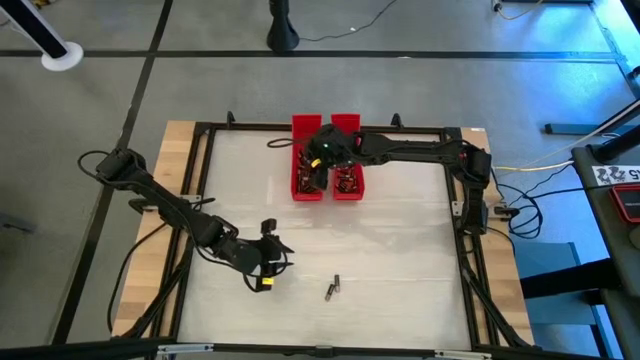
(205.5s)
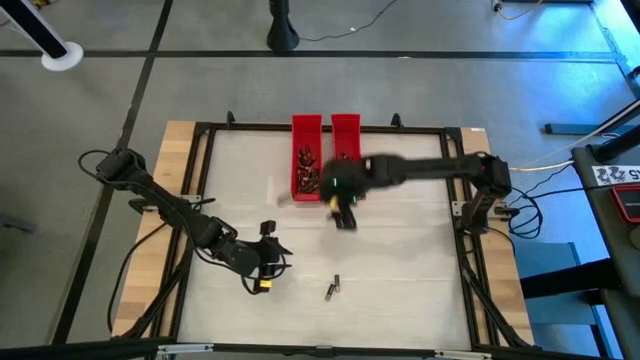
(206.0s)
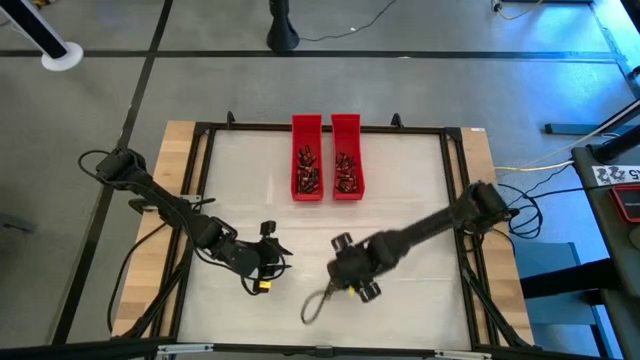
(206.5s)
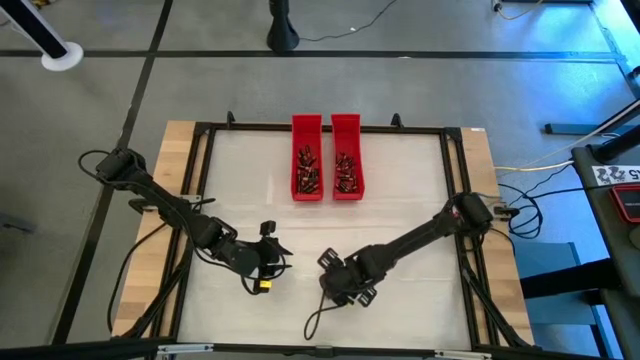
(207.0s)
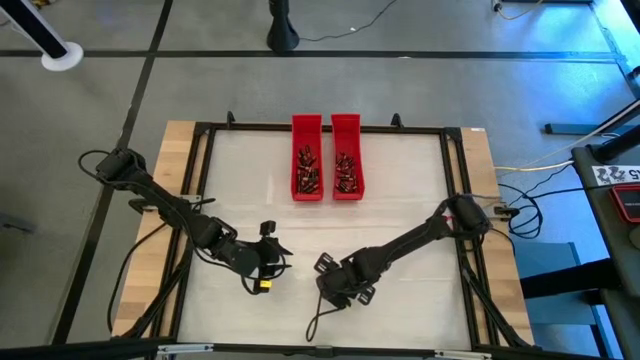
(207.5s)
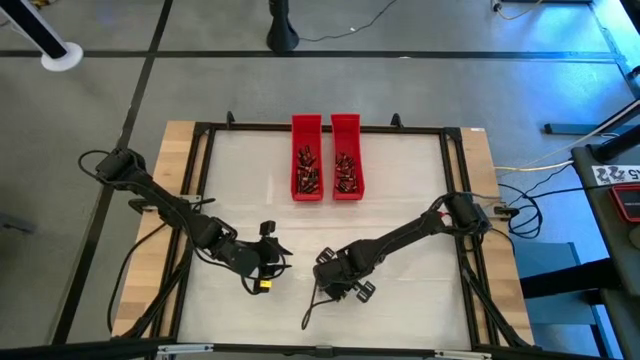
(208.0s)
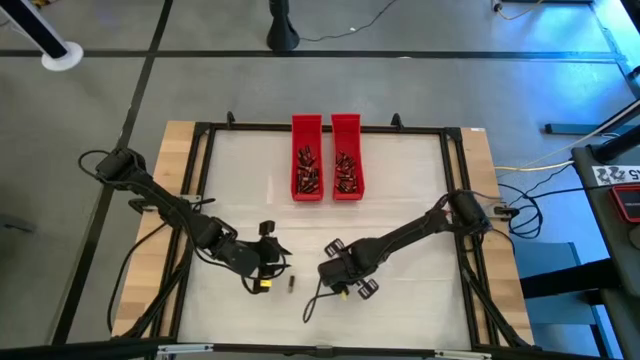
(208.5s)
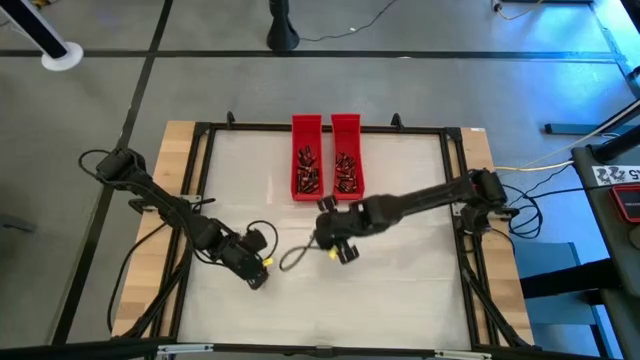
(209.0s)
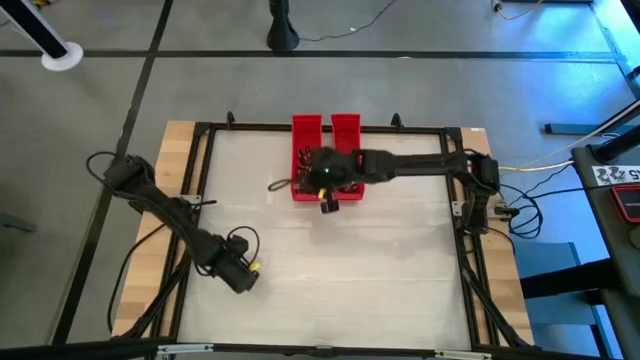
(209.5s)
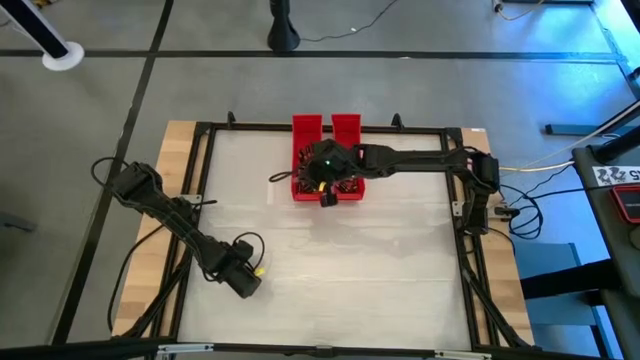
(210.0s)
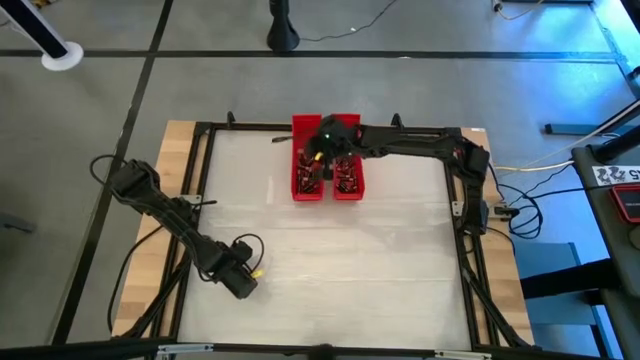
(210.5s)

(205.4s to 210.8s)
Task: Sort batteries
Put the large black battery into the left red bin

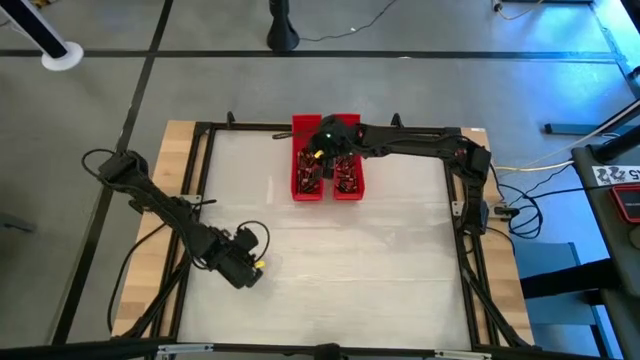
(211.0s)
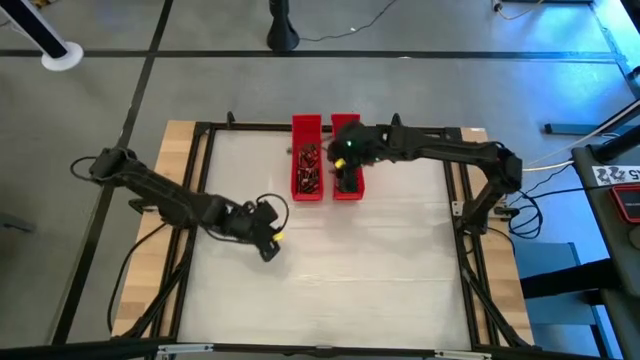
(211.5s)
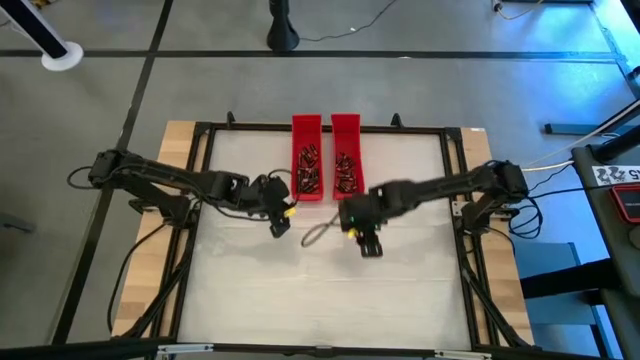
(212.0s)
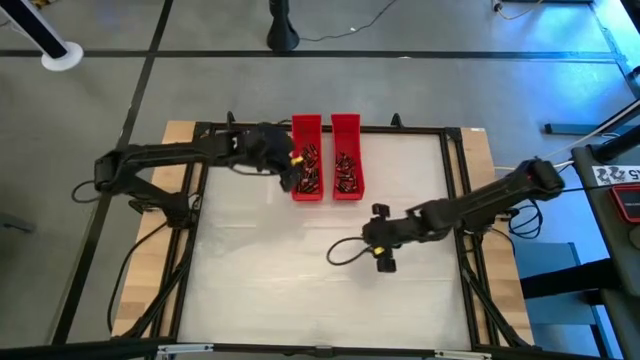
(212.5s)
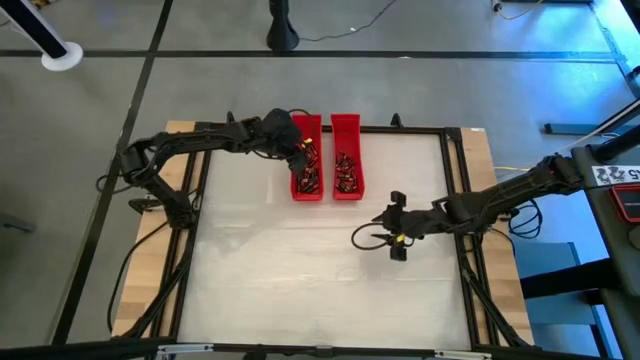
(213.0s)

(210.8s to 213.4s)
Put the large black battery into the left red bin

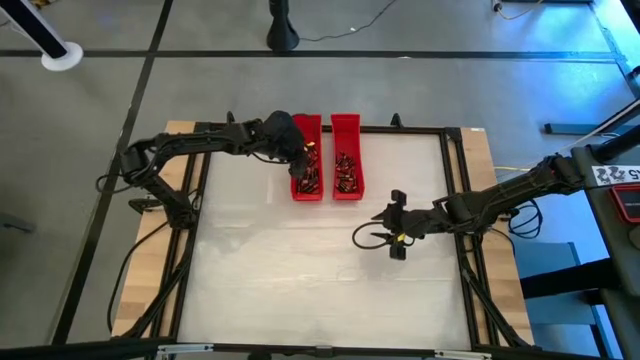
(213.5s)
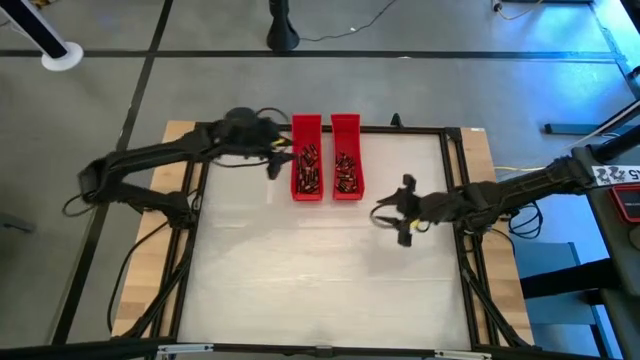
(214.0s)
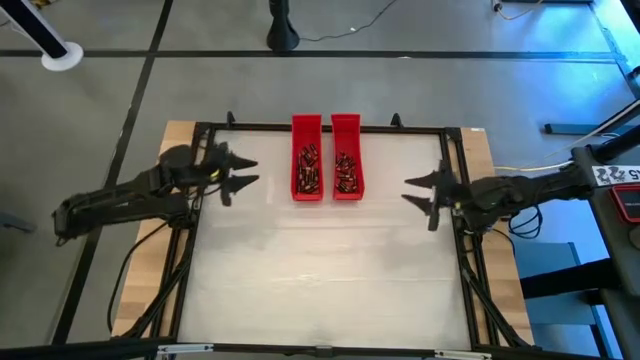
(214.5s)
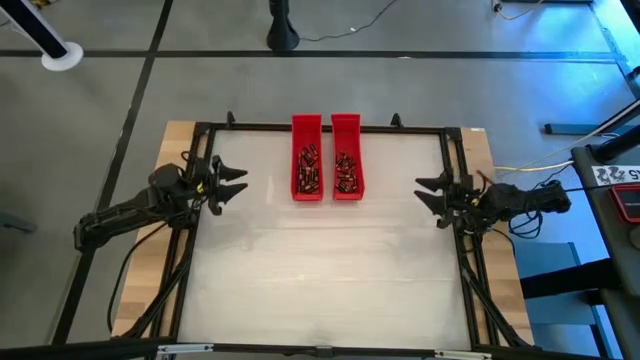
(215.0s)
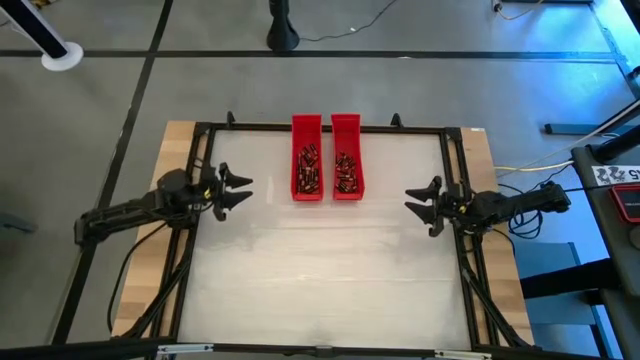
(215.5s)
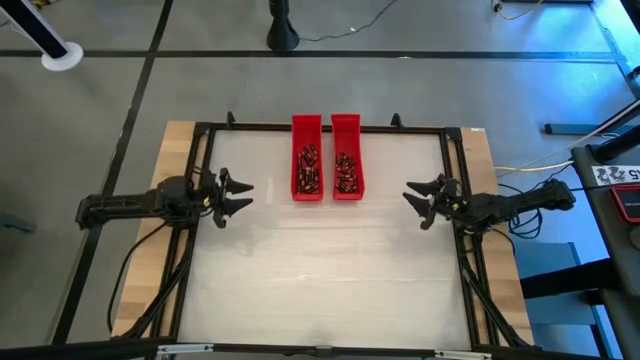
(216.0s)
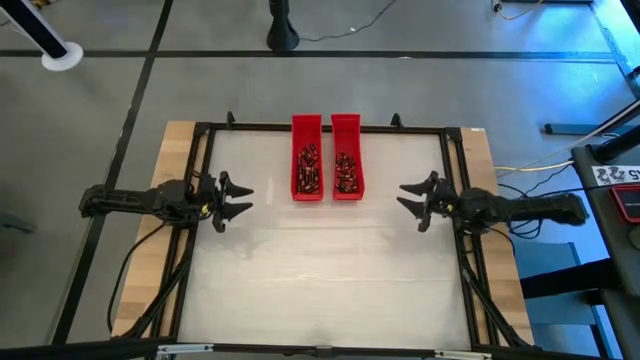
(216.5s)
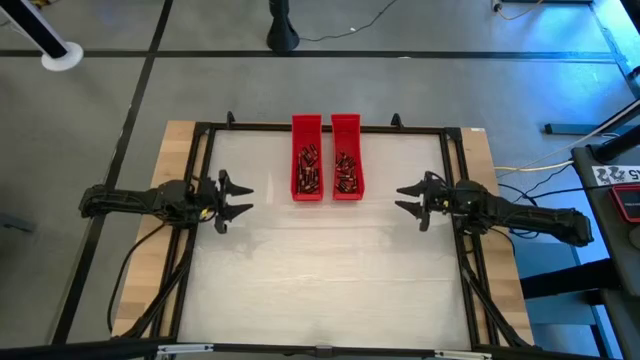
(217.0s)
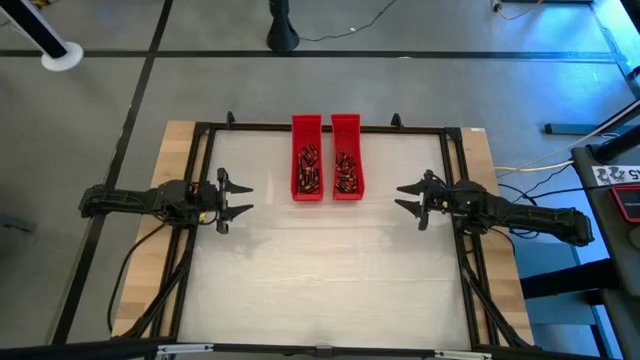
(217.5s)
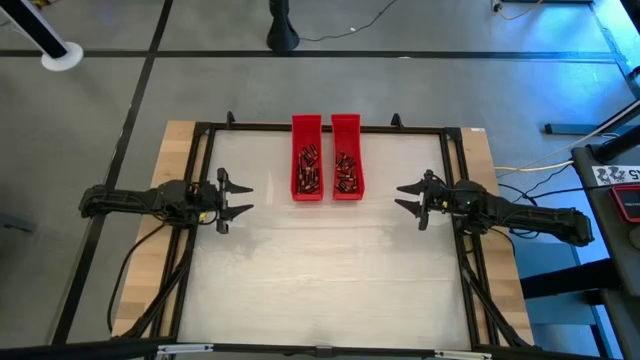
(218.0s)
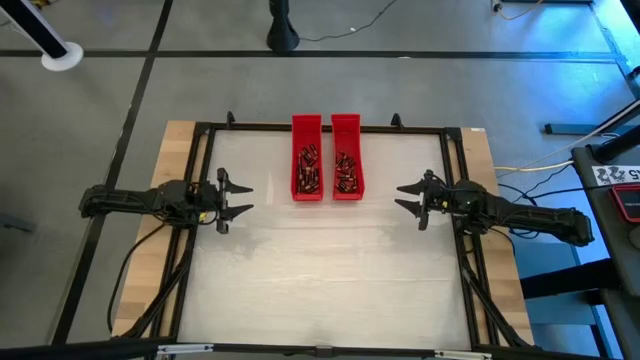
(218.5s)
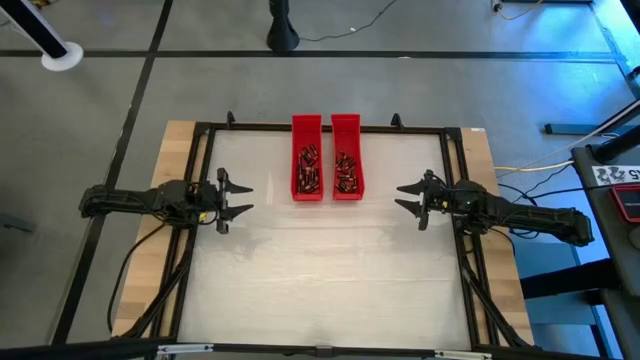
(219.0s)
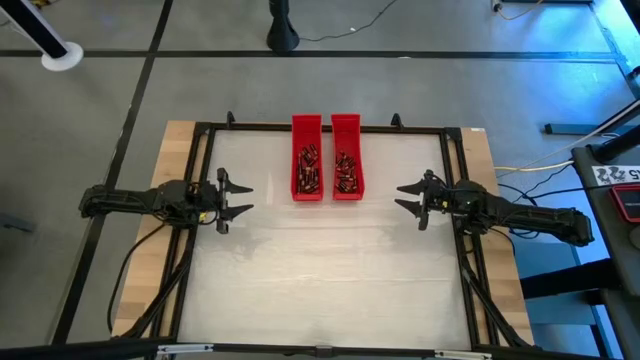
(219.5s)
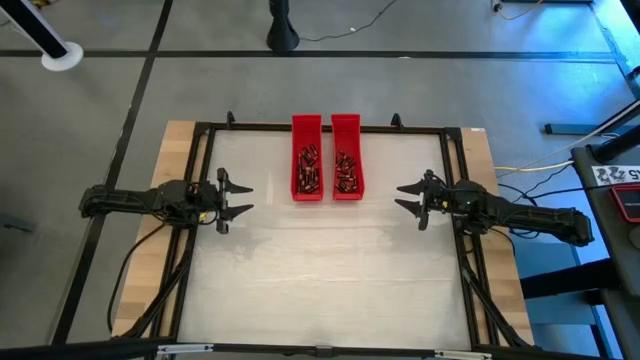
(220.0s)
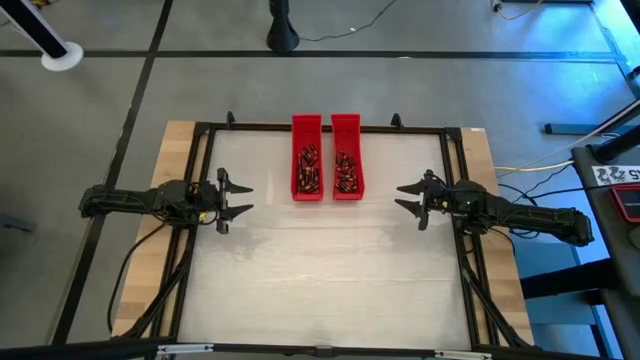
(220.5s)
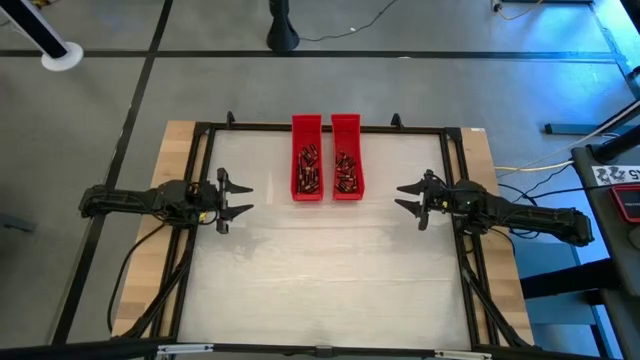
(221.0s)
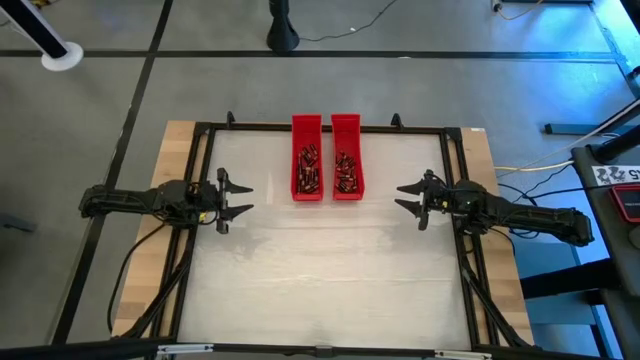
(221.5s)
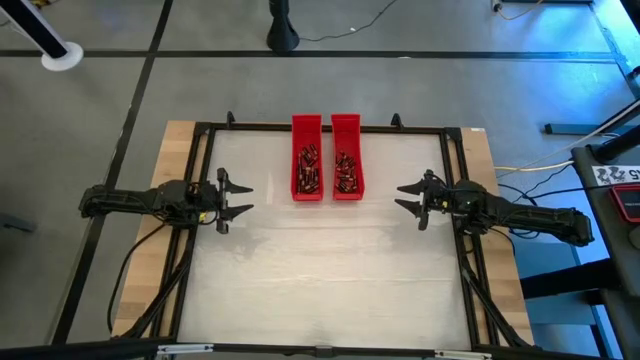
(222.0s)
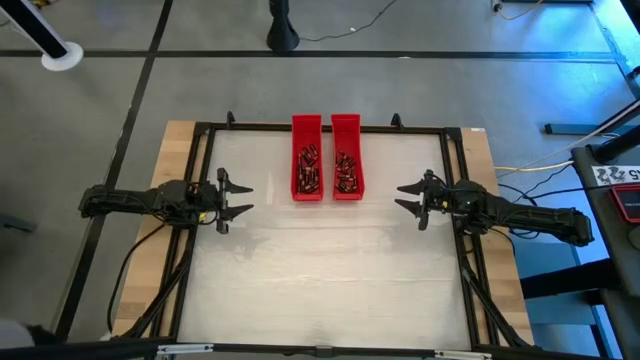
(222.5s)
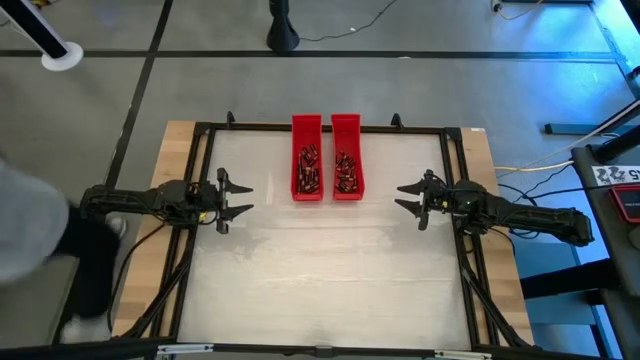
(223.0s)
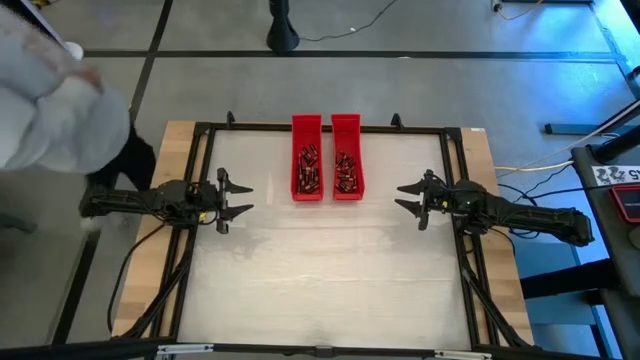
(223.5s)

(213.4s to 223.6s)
Return to Home Position

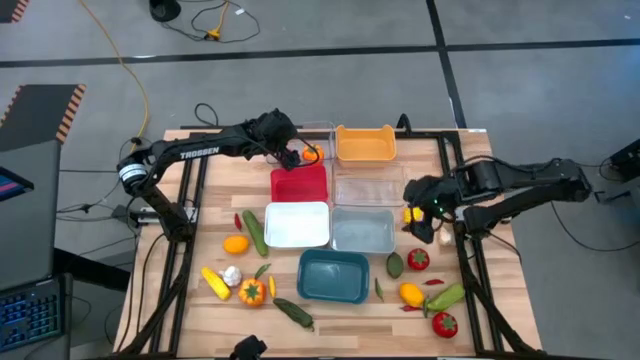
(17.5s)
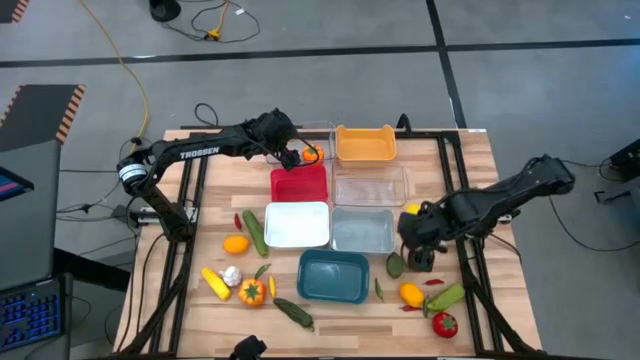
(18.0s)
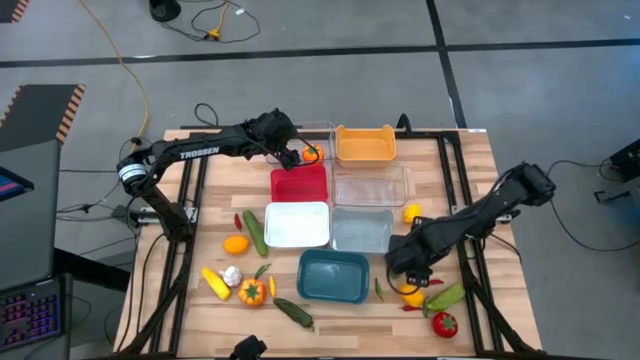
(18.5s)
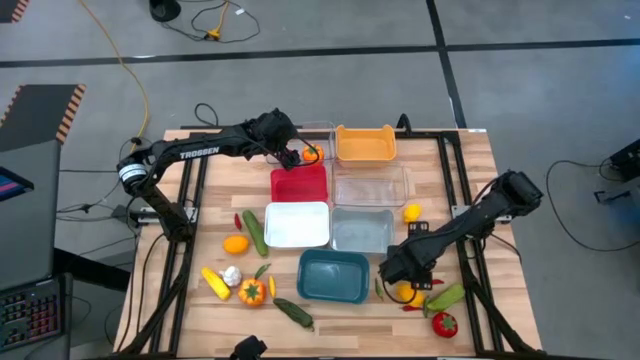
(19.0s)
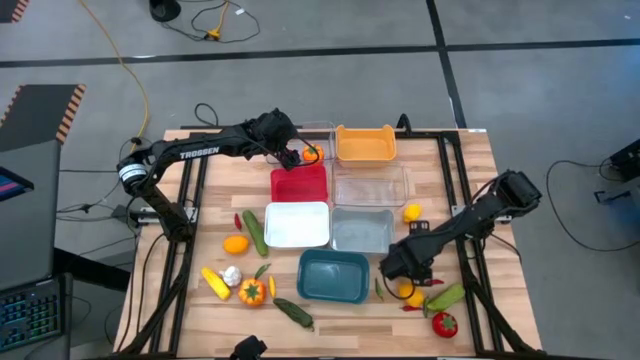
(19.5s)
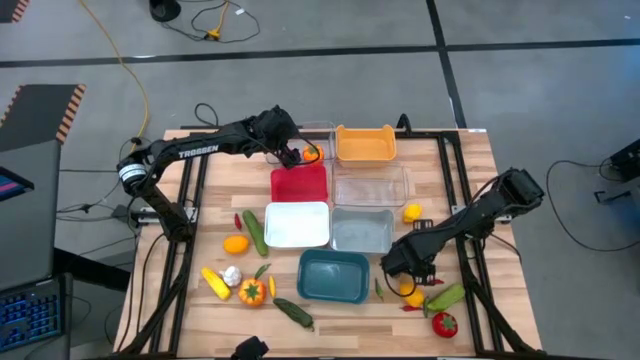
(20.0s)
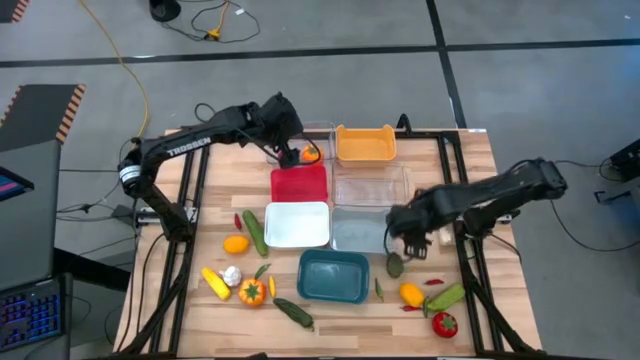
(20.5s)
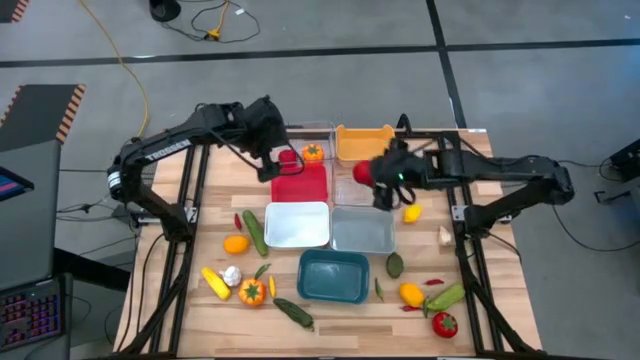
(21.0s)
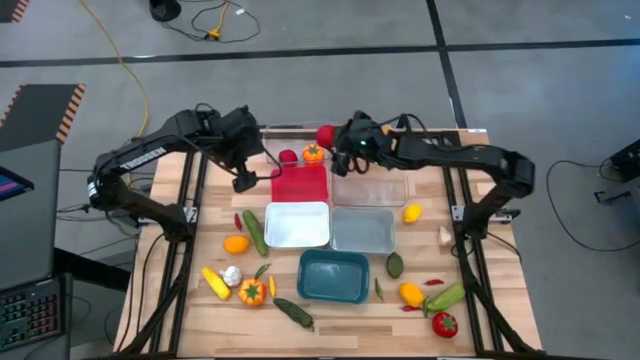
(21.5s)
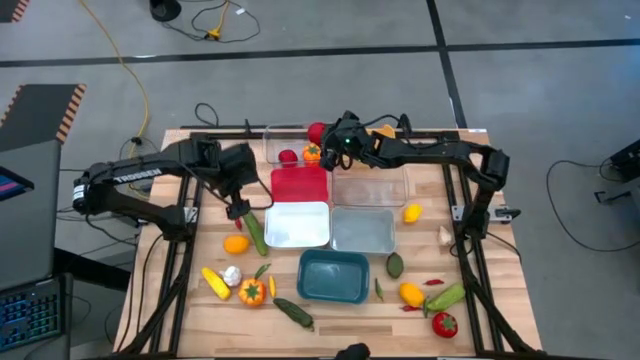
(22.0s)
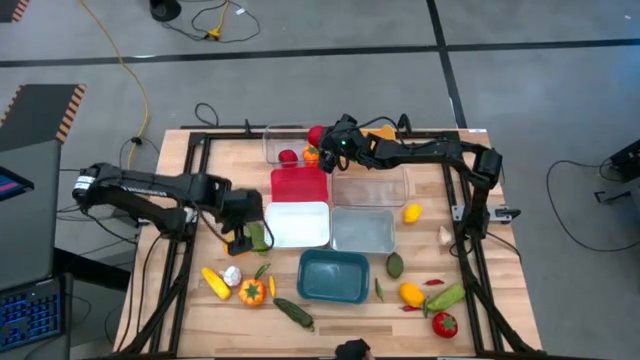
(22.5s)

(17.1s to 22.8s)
Task: Sort produce into baskets
Put the top red tomato into the top transparent bin
